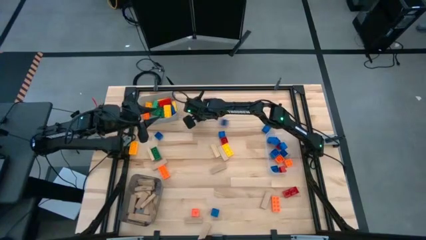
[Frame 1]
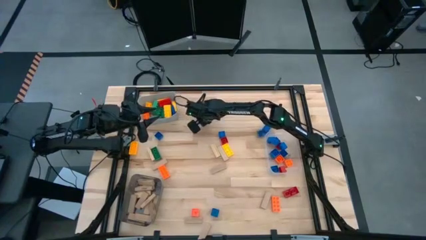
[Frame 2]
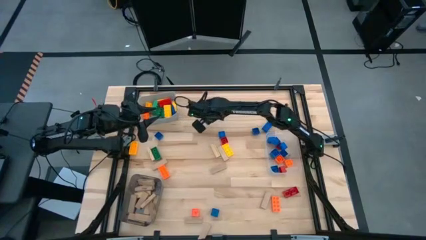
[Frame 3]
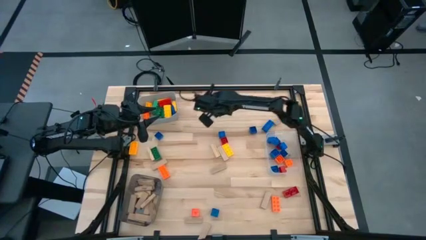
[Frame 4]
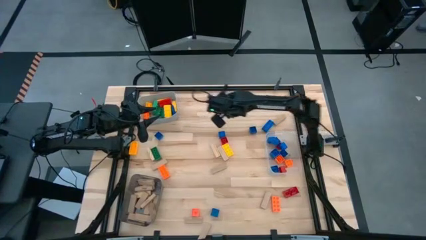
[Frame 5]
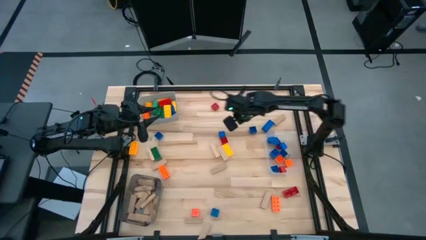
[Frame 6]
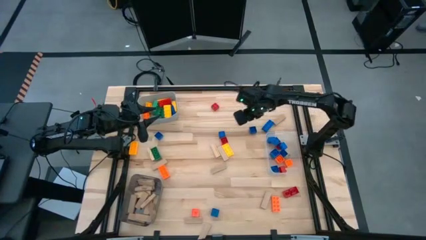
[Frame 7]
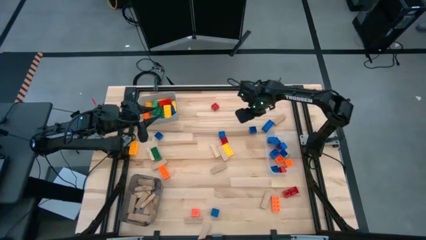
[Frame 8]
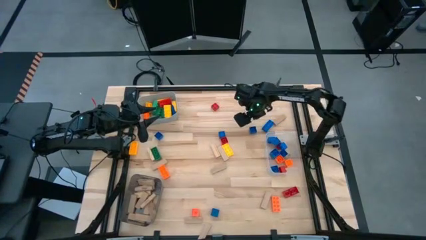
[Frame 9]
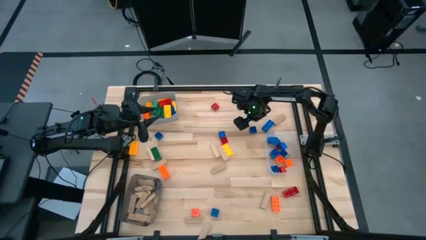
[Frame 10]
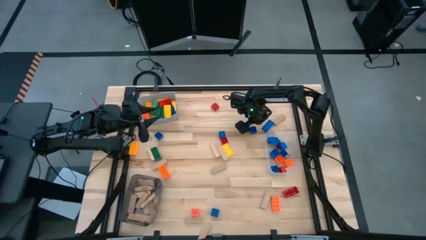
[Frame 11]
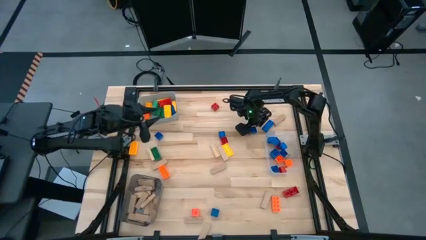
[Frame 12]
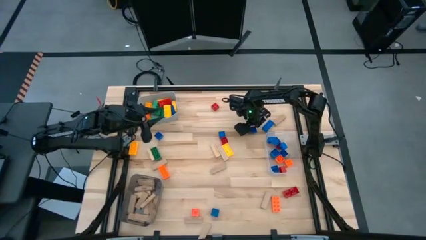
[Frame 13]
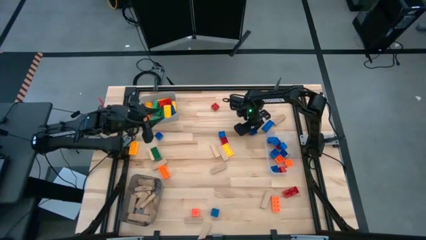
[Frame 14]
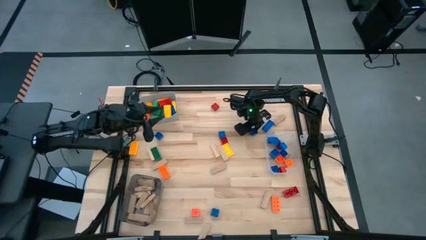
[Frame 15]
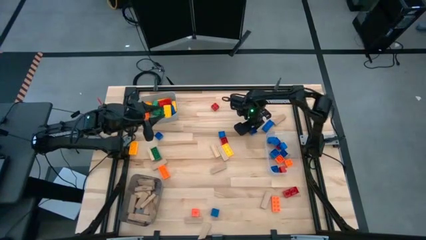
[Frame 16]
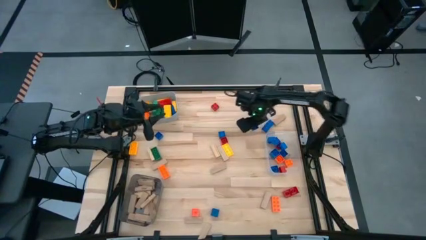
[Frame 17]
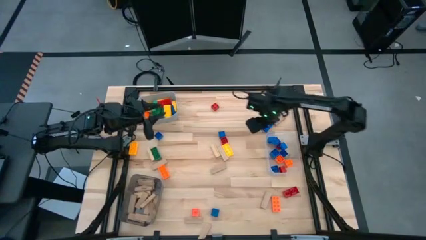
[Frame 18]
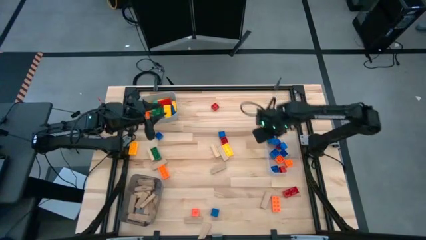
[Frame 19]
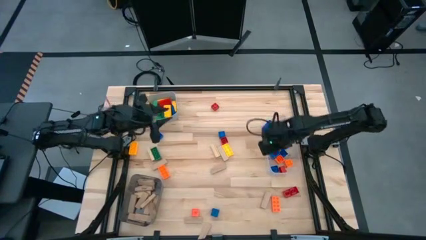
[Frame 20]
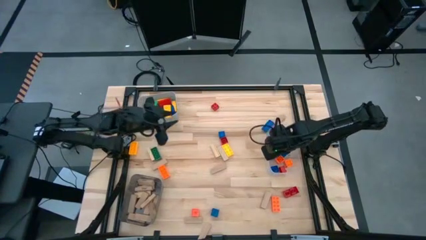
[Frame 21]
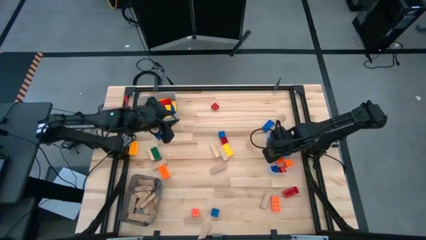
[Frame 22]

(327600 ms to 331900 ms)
Task: Sort blocks by size
Put the small blue game piece into the transparent bin

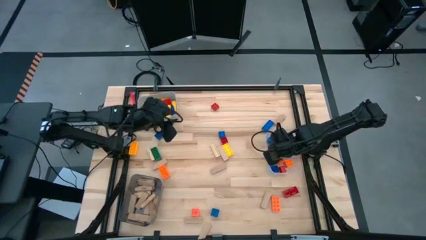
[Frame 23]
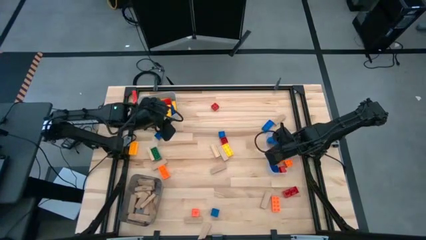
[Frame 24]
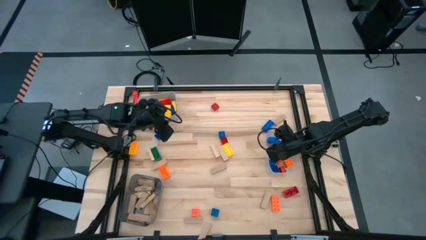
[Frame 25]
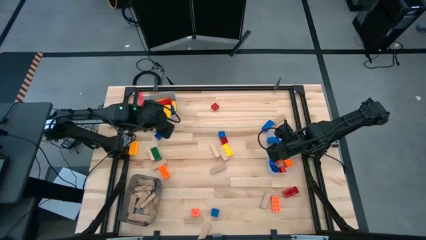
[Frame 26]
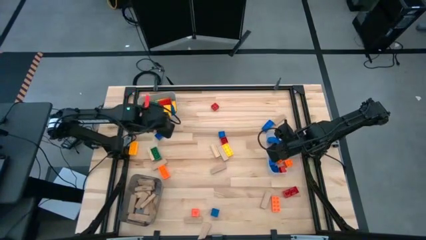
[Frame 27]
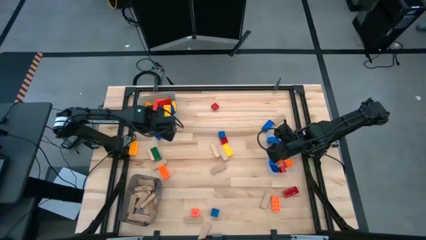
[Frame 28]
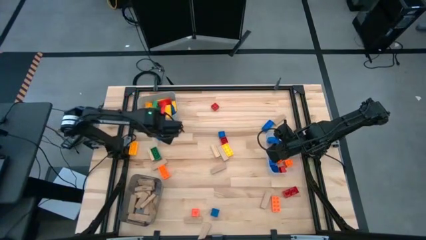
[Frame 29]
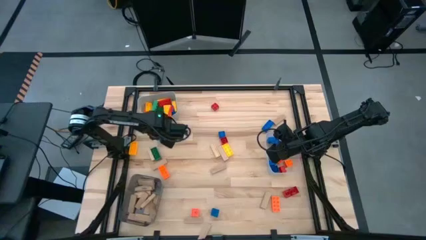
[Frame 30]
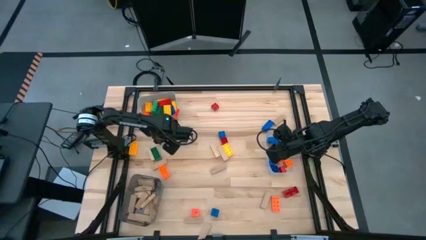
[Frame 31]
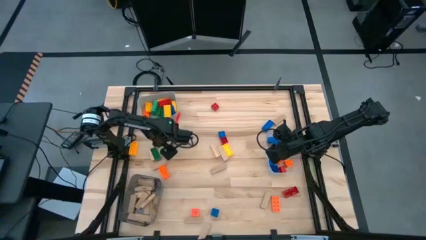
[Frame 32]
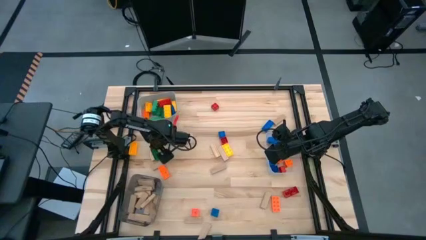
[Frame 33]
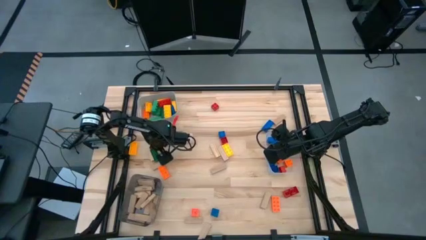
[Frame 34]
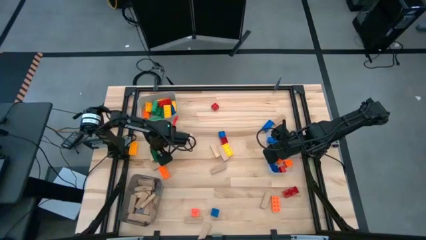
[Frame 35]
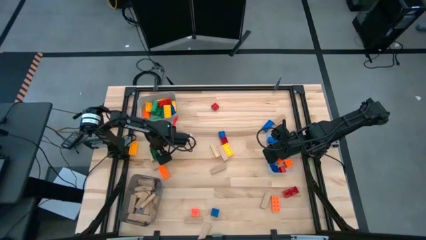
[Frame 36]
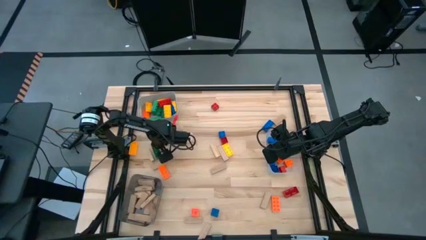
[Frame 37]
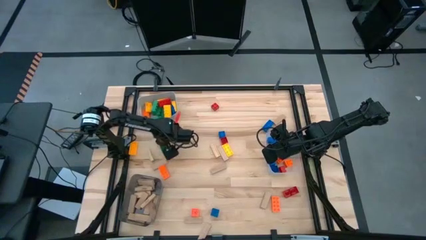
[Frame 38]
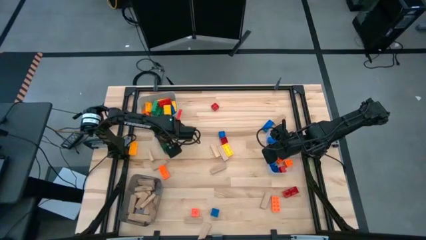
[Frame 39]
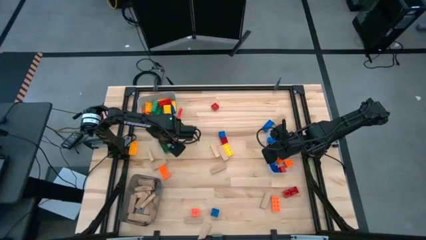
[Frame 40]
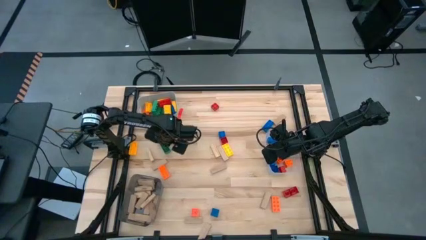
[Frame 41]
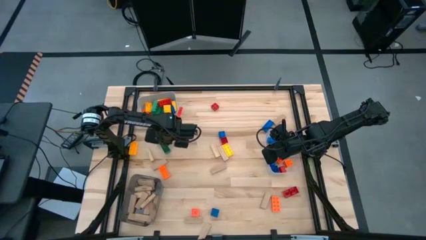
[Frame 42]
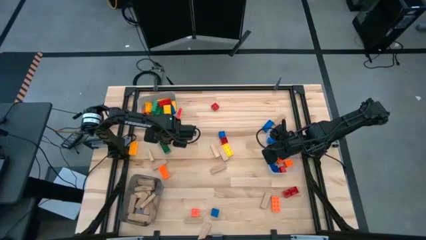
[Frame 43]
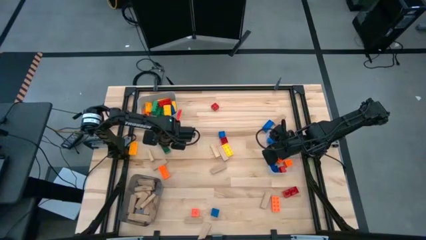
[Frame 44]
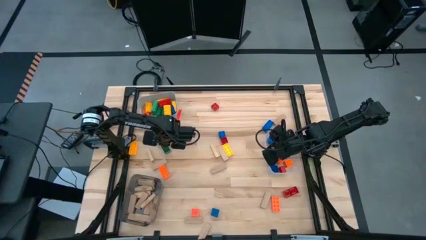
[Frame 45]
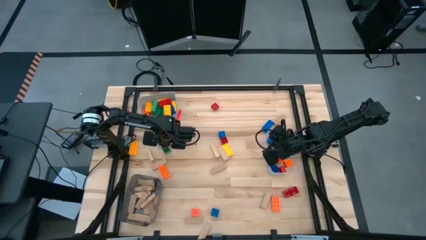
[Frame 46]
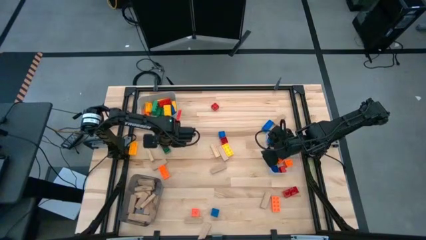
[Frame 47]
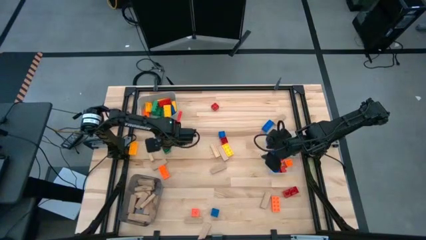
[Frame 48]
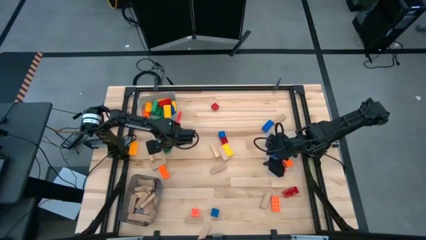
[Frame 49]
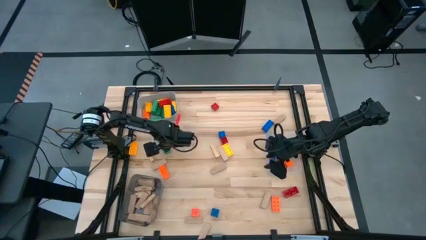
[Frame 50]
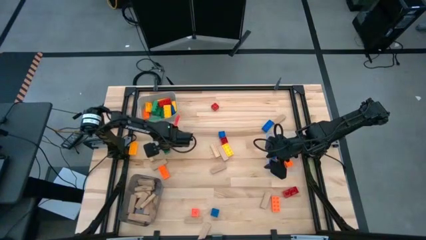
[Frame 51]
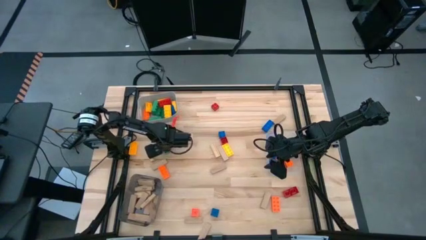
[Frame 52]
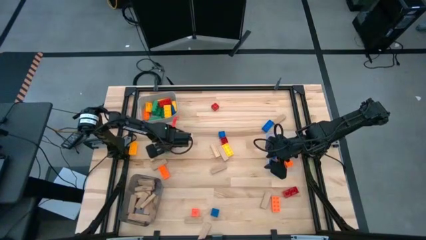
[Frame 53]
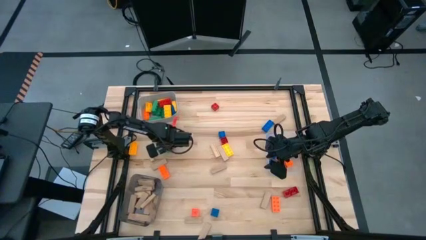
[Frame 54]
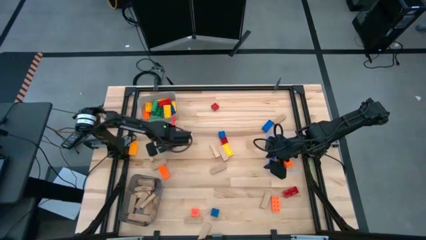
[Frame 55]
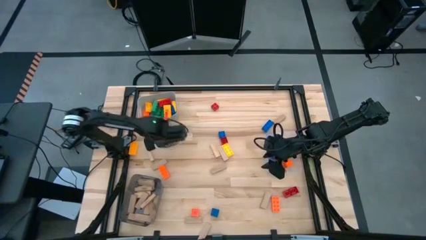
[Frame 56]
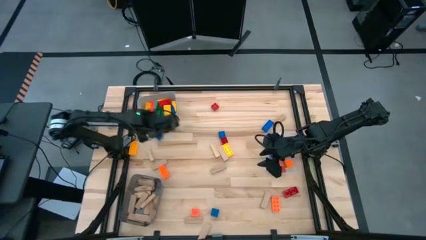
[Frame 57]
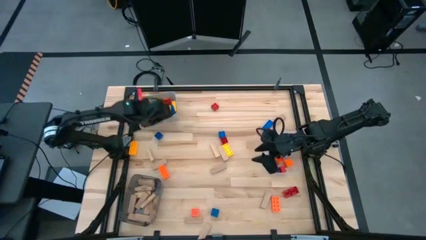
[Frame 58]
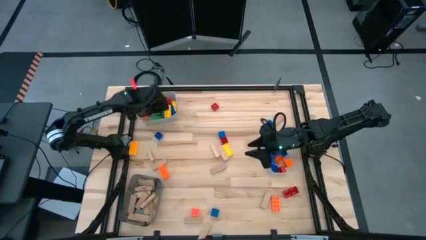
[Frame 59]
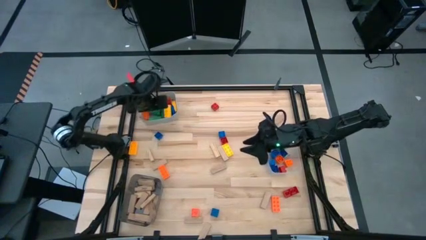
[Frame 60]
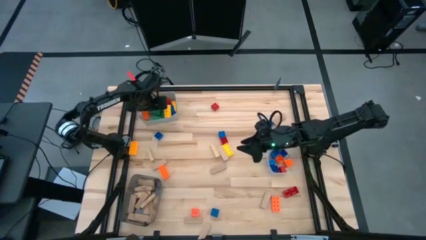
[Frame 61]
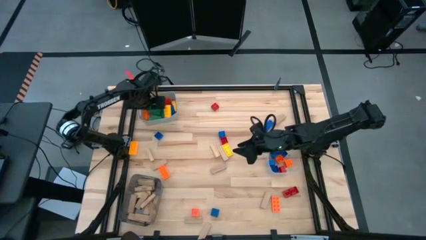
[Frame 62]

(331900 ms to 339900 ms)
Put the large green game piece into the gray bin

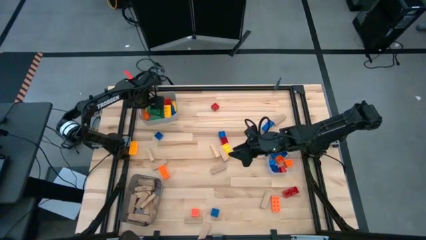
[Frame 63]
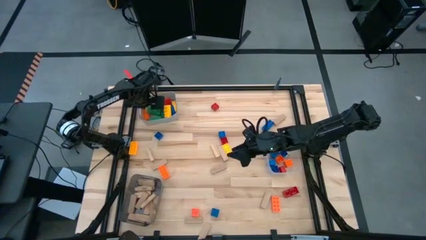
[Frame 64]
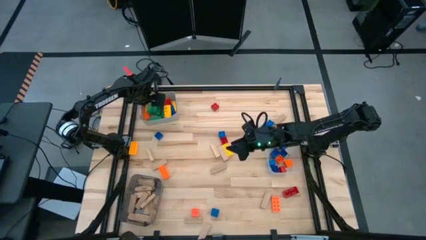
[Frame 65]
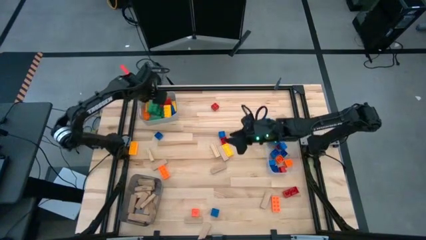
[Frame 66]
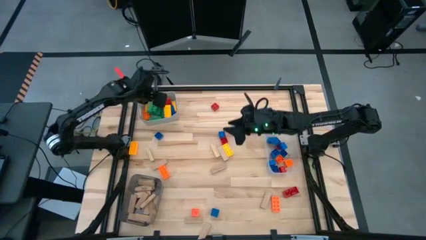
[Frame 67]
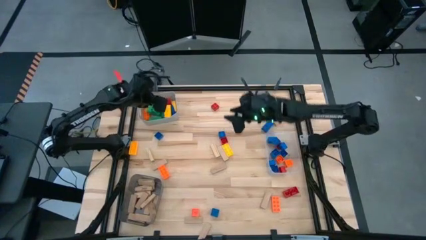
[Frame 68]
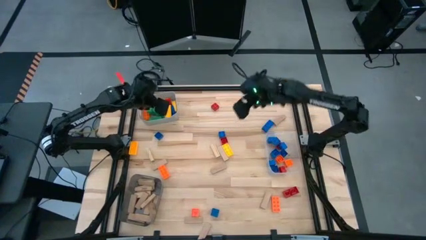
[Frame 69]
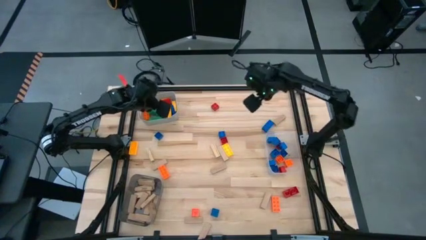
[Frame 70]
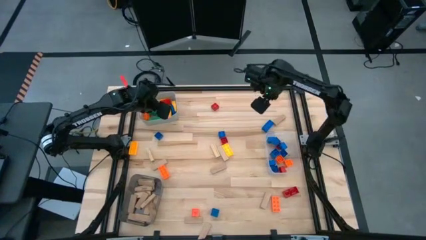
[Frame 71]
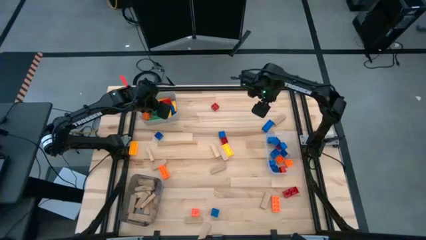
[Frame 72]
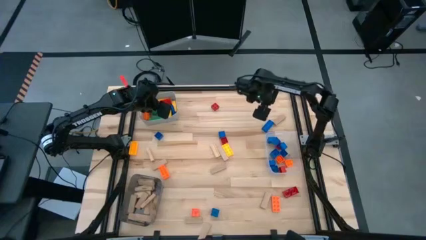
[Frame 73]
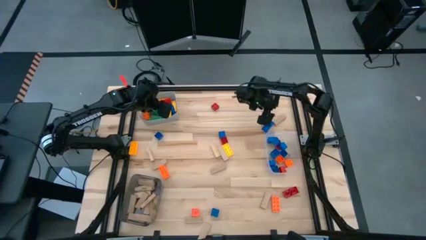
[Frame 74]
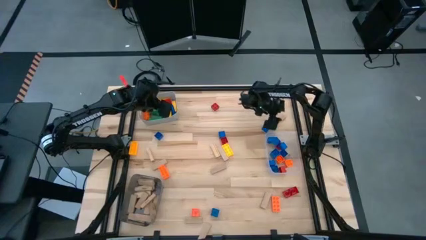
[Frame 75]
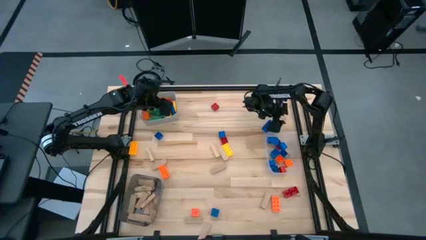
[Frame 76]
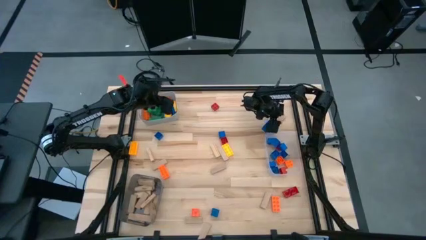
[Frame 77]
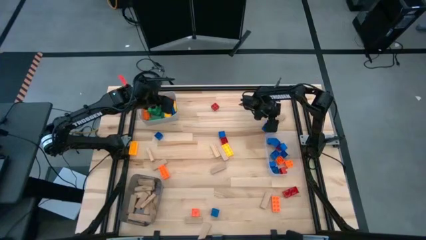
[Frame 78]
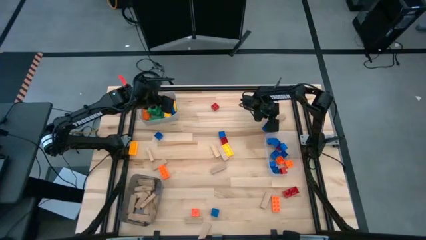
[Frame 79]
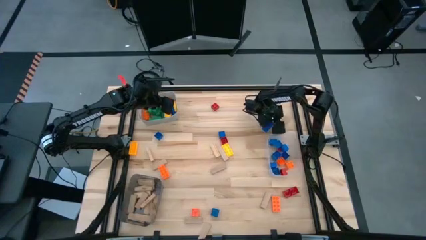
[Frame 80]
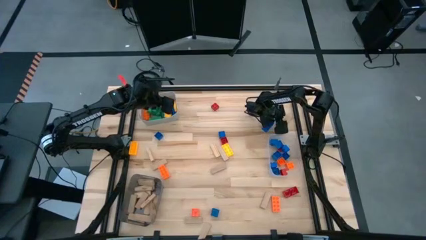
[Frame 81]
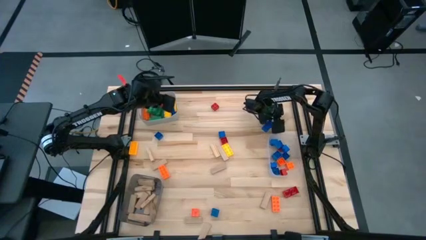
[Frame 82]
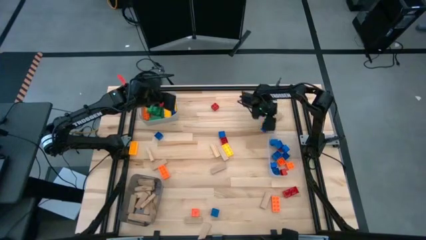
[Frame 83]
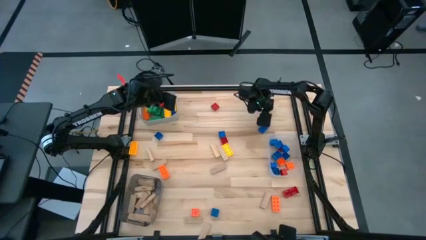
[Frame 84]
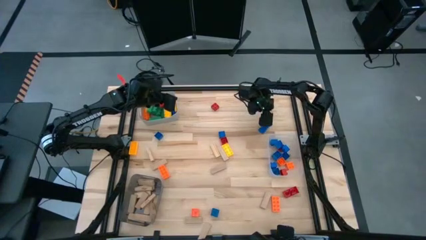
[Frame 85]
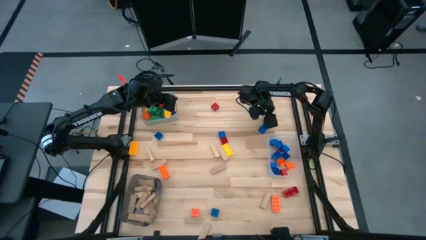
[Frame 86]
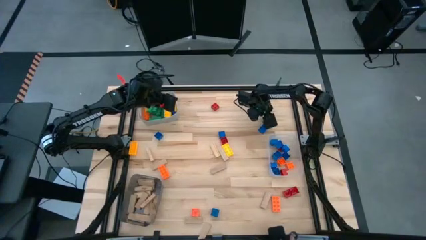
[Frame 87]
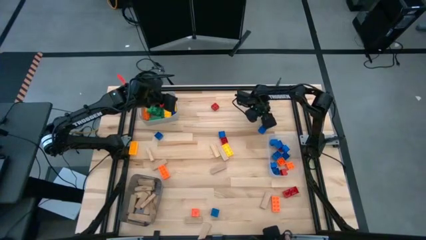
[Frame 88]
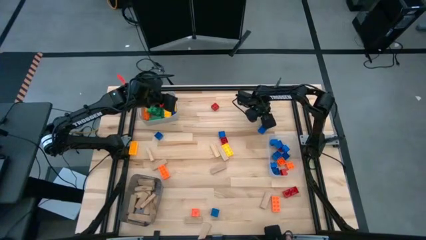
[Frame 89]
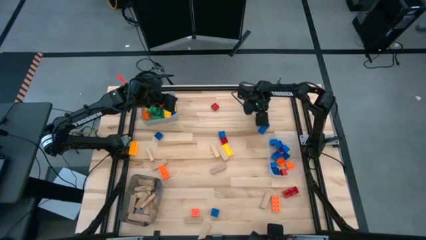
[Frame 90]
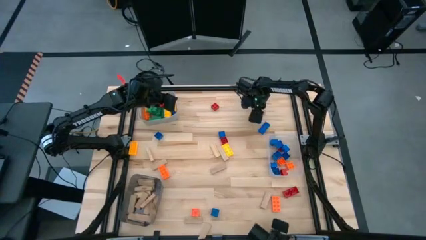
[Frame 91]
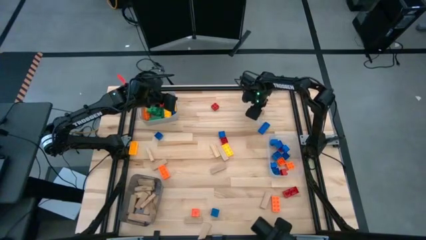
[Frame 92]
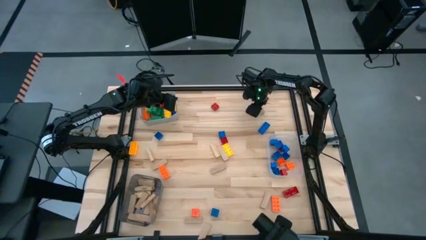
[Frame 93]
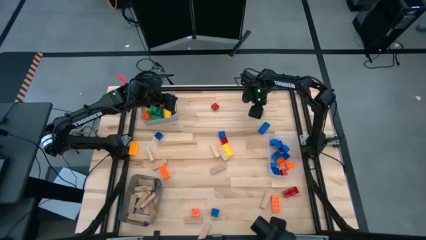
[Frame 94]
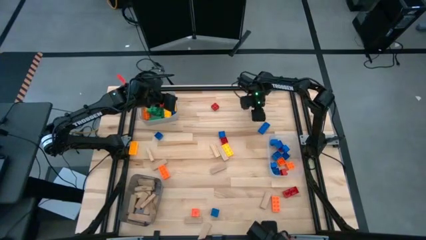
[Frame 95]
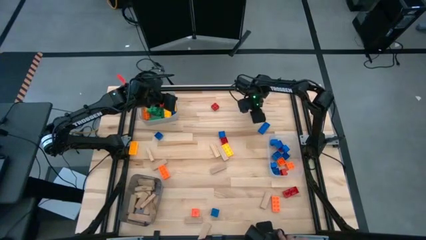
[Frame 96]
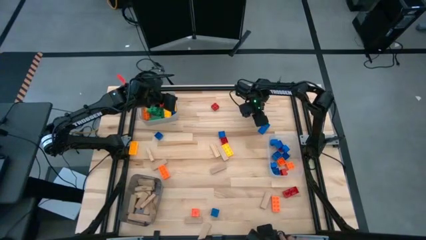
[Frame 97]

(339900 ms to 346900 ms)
Put the brown block into the black bin
